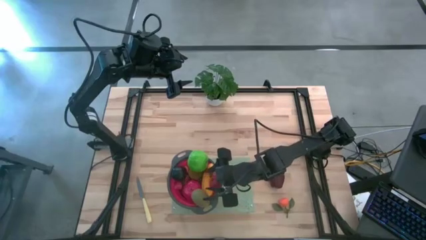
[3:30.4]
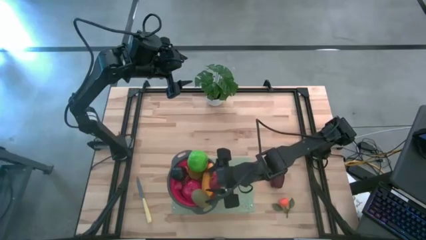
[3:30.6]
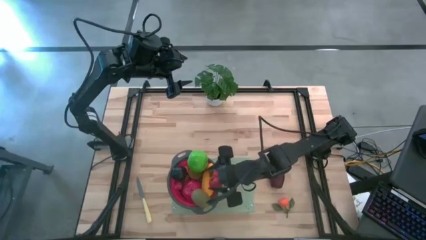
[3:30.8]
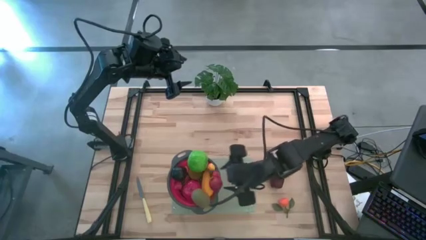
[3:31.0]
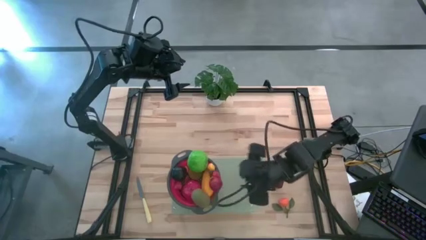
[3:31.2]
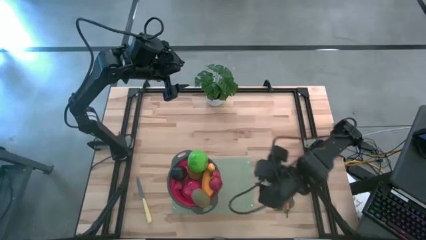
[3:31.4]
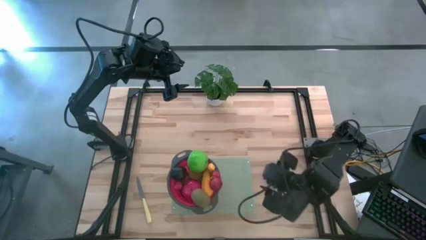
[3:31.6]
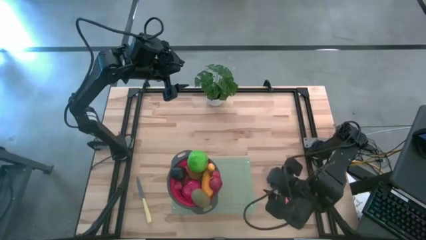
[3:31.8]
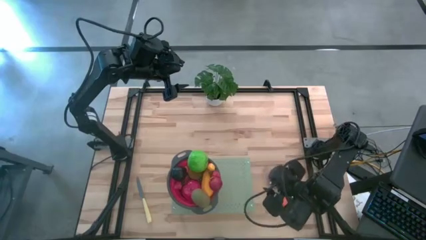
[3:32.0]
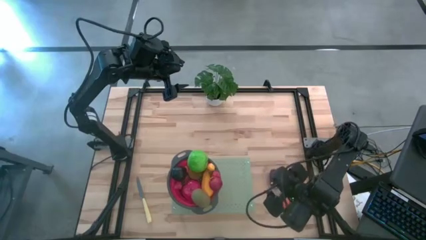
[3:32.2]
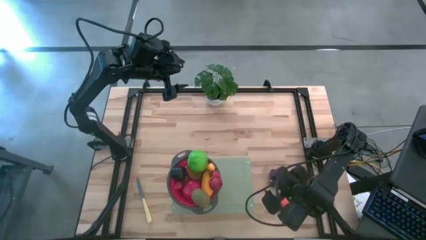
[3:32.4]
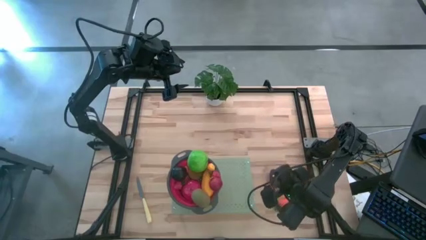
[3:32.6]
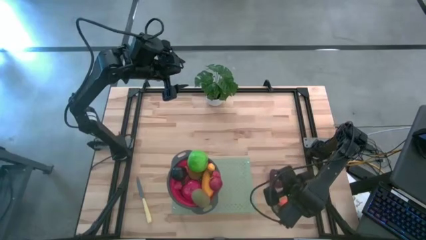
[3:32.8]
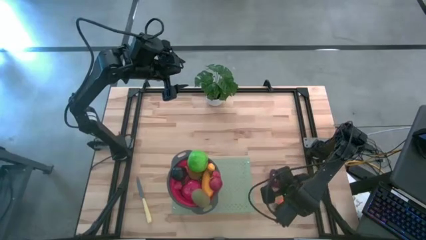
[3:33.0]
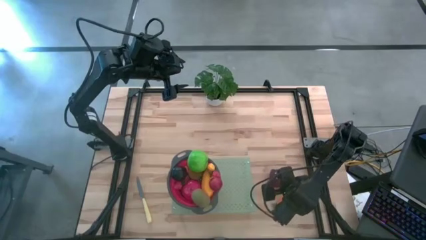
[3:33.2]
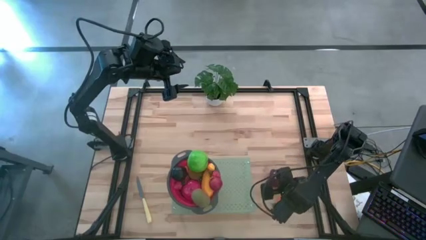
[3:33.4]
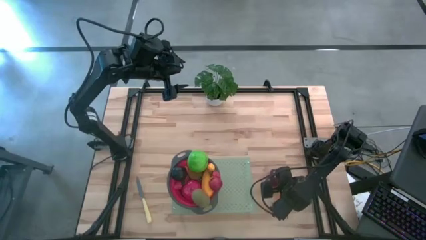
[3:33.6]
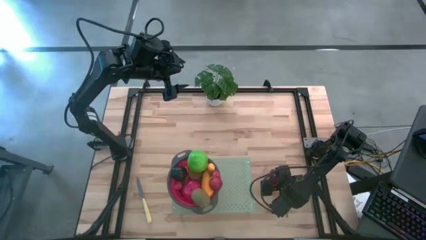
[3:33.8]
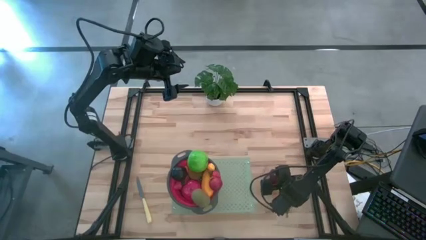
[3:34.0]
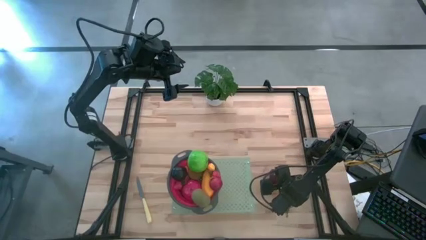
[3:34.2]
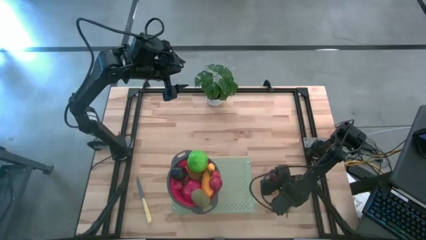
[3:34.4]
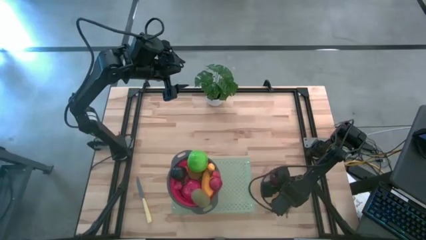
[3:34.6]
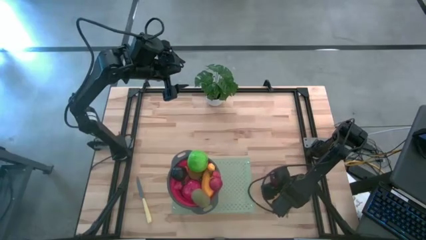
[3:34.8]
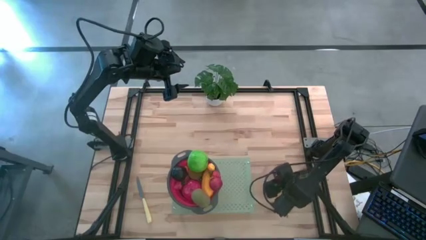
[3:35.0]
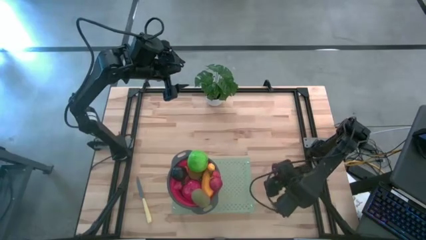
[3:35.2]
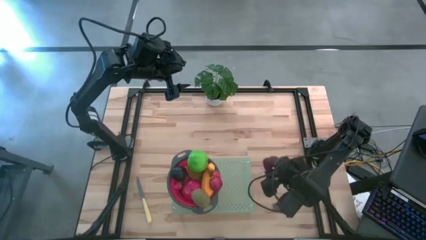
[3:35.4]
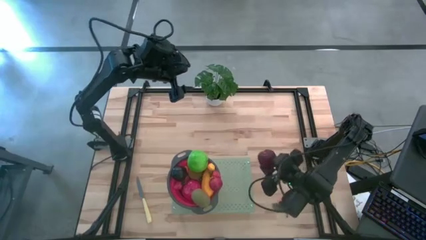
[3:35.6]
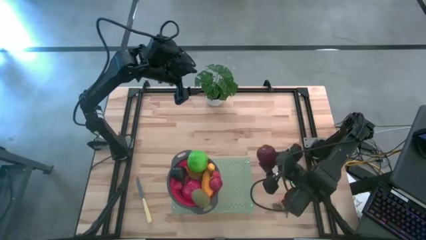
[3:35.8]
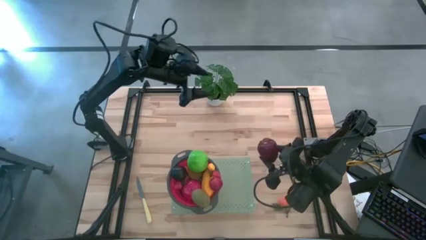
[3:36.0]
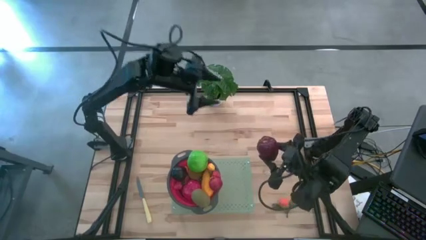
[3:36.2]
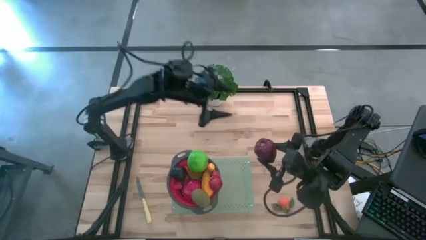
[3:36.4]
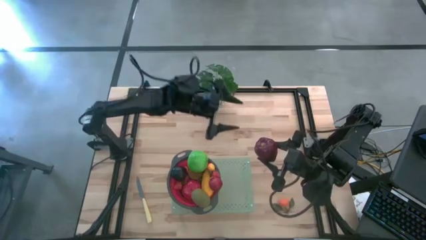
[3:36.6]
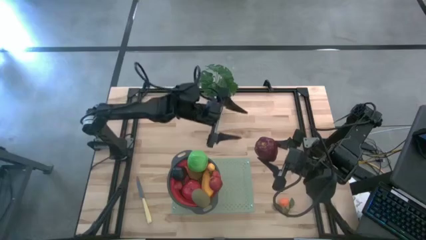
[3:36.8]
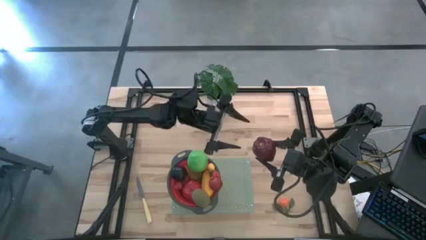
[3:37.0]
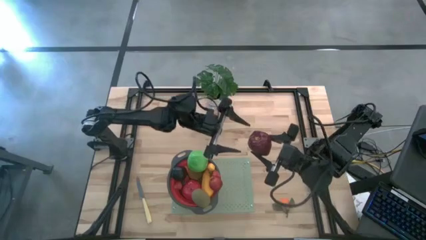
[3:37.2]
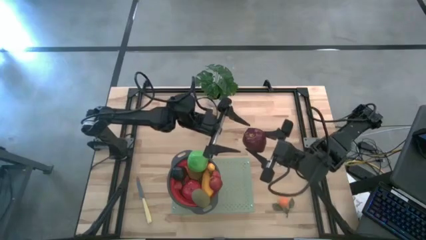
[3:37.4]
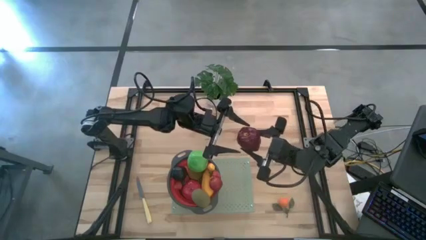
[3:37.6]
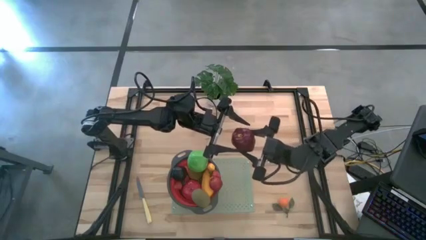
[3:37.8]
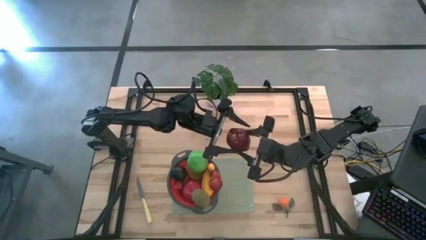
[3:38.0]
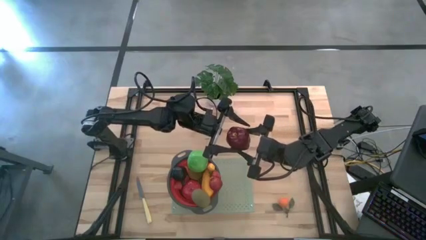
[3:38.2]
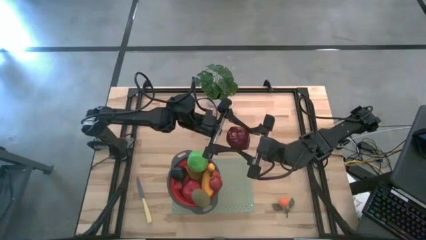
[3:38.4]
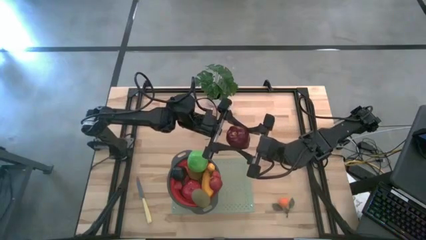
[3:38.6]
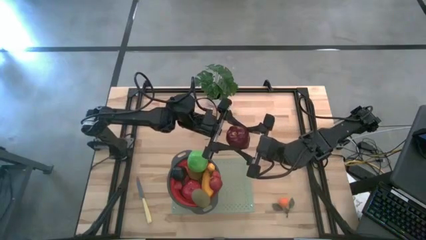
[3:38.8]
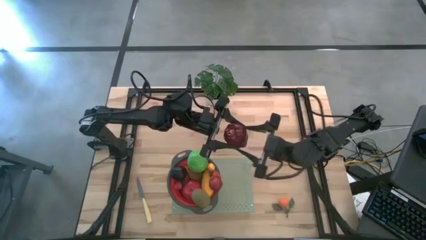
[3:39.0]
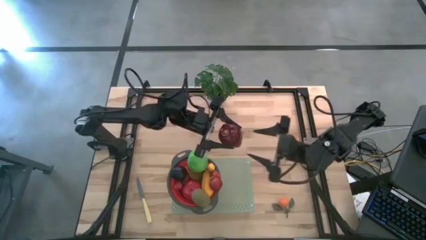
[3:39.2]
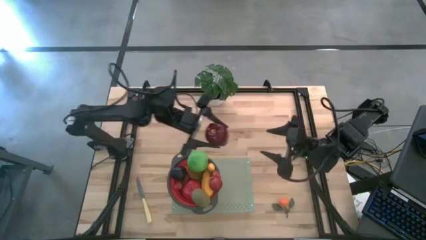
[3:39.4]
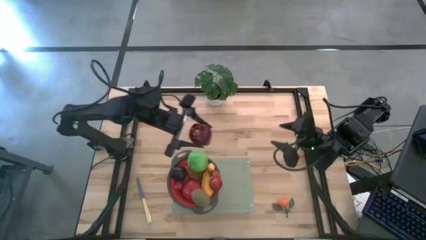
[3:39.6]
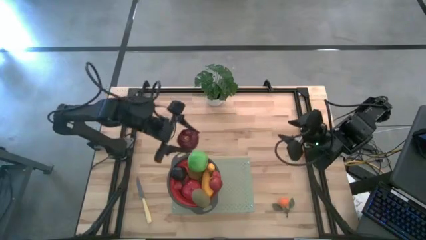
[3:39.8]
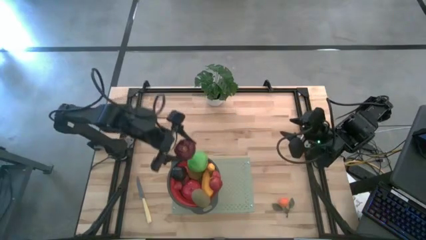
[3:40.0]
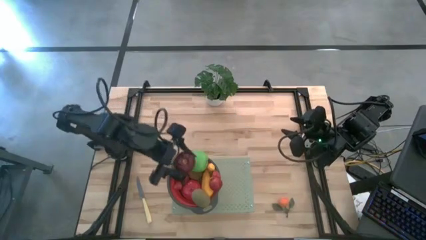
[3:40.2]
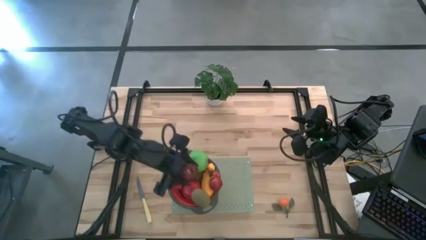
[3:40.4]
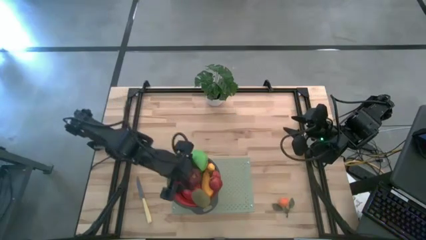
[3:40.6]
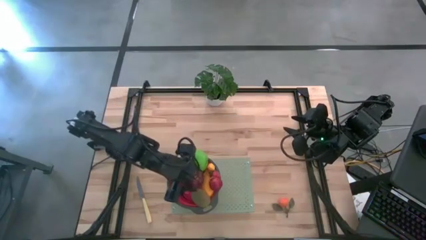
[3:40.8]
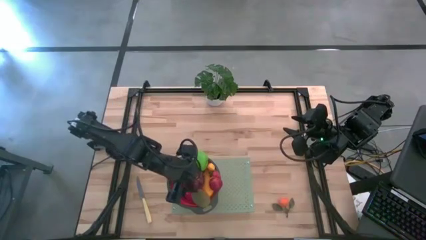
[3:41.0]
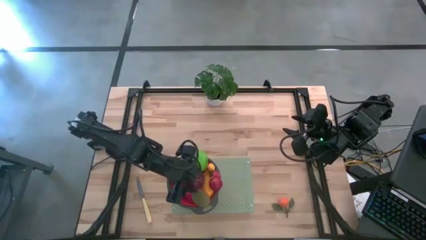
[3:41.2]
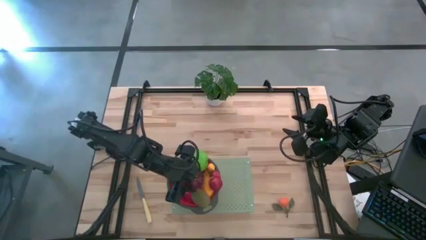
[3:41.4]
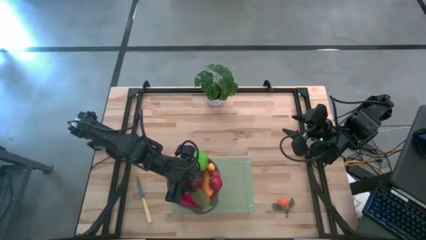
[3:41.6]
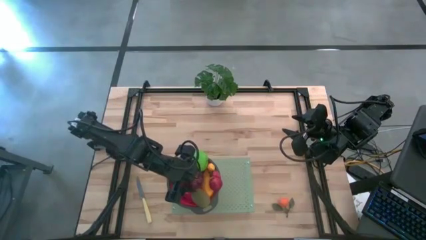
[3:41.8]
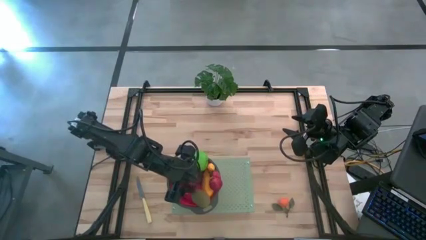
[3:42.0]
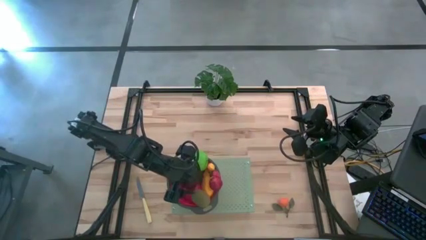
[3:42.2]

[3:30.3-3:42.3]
Task: Pick & Place Fruit
Put the red apple into the red bowl

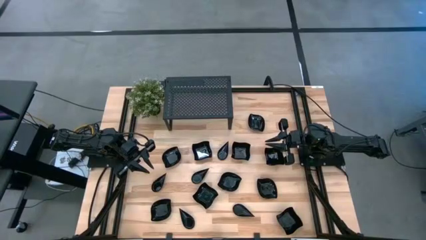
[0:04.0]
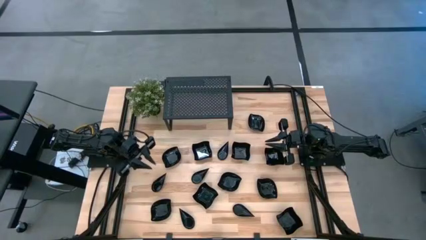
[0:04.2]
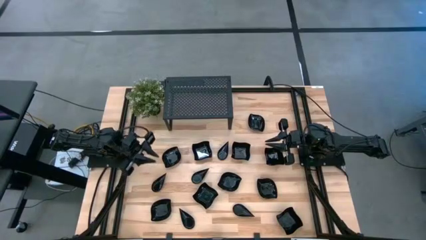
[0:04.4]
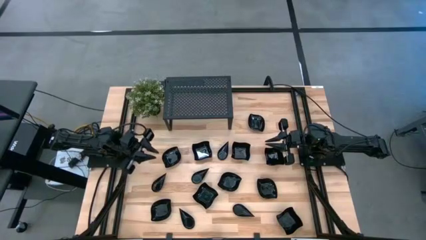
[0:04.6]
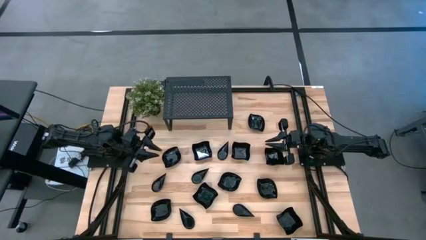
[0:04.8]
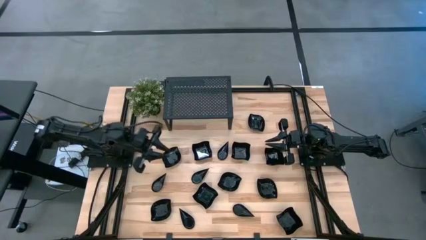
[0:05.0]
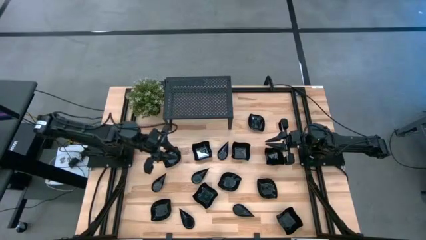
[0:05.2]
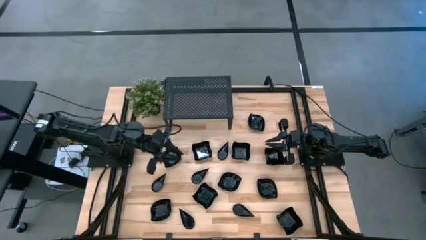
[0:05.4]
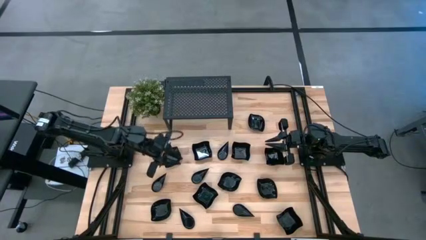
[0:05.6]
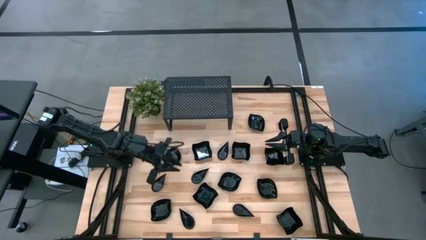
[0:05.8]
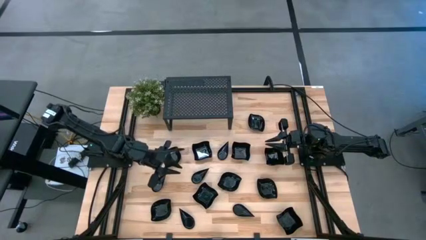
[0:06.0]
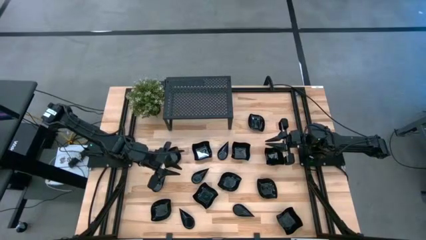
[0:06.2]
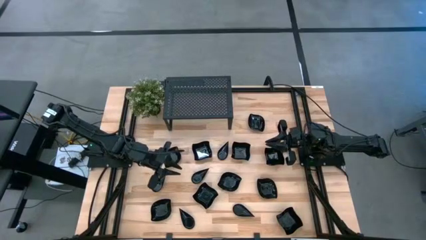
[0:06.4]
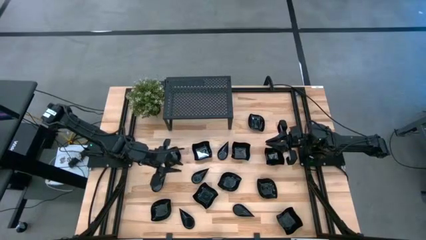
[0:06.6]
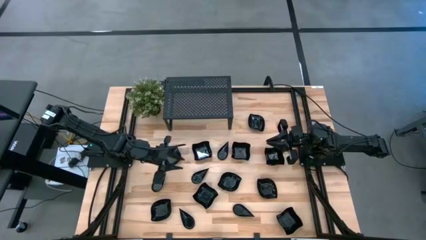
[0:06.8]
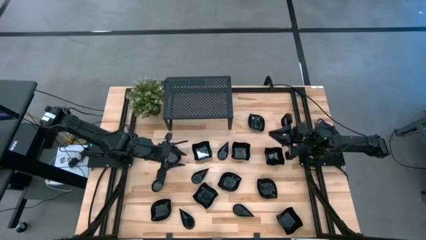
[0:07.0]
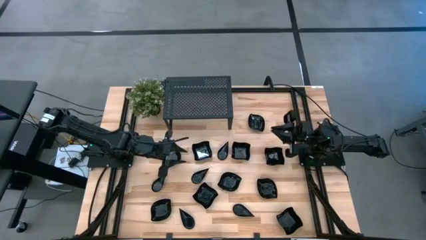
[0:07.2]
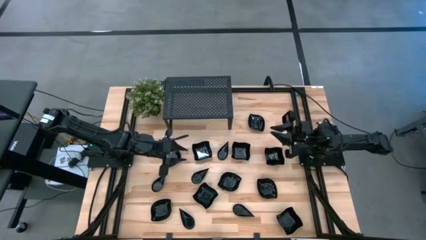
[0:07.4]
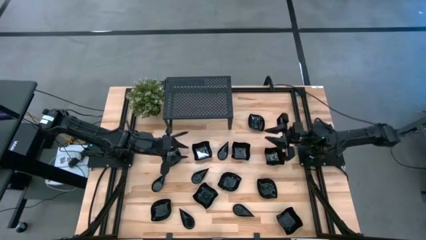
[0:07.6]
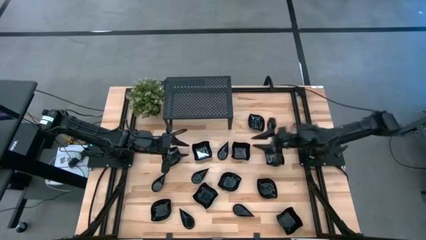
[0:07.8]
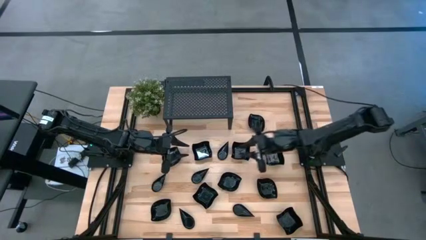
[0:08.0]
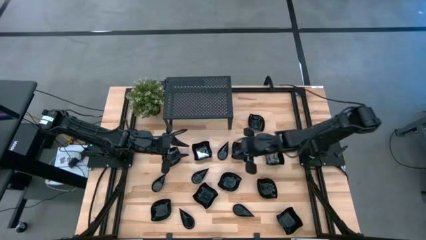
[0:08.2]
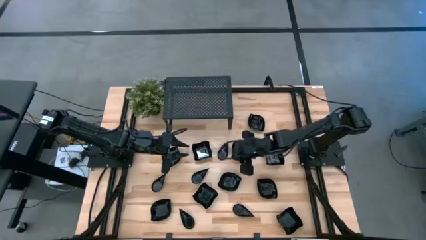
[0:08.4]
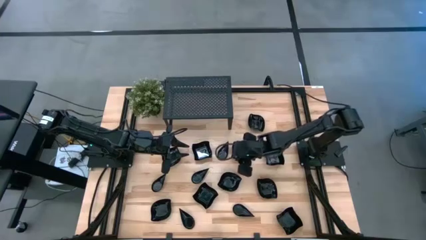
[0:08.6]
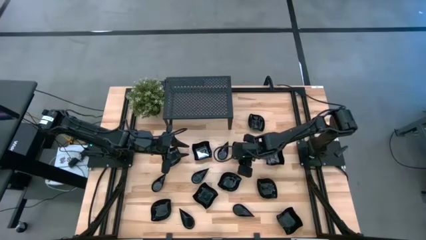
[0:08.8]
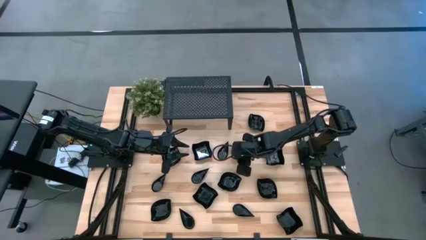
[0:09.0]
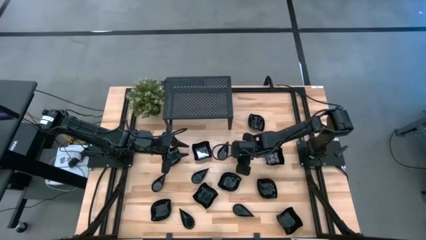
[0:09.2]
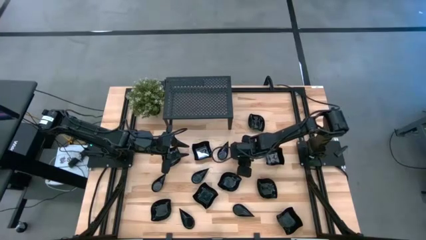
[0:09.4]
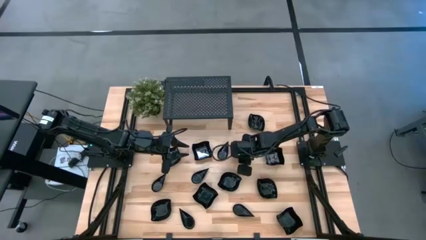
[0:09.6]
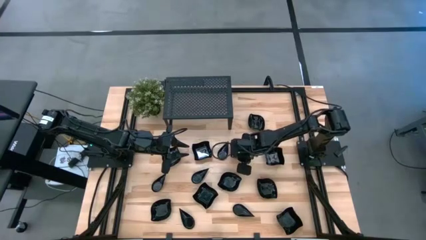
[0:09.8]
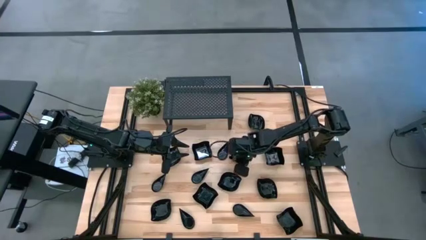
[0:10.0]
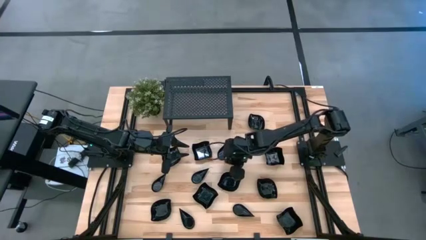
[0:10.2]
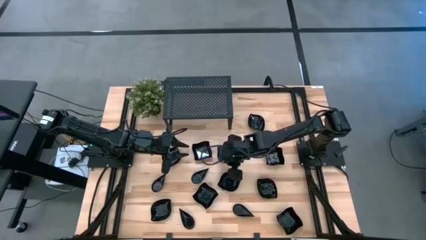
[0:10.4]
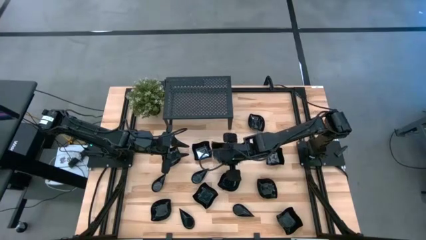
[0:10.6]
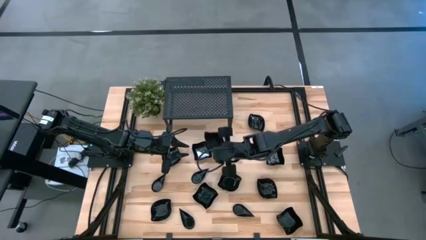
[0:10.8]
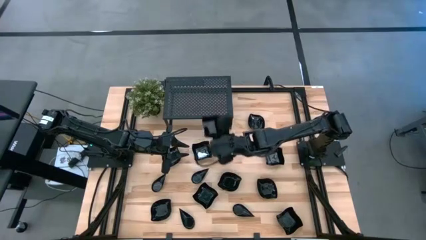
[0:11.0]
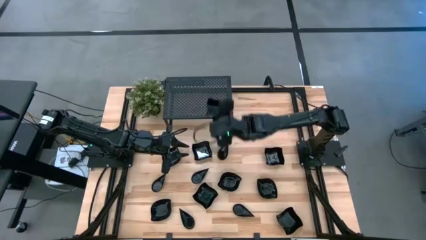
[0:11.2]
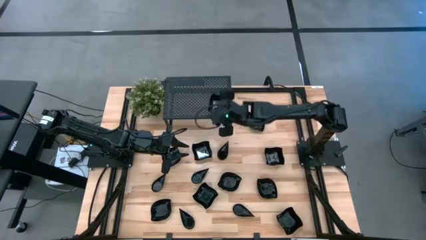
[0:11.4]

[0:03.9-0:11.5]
Task: Pick & Place Mini shaped plates
Put the black distorted square plate on the shelf
